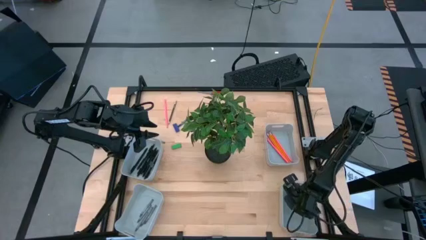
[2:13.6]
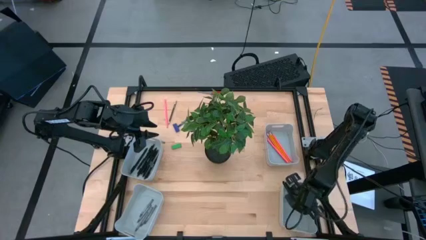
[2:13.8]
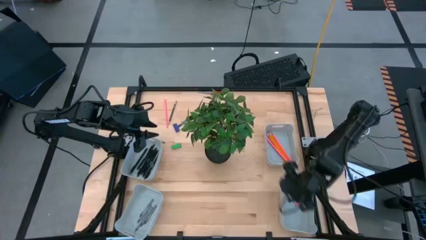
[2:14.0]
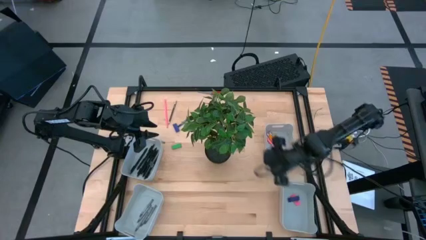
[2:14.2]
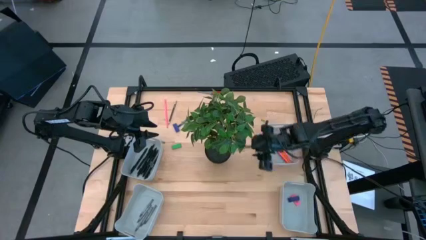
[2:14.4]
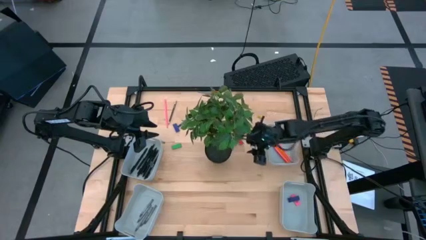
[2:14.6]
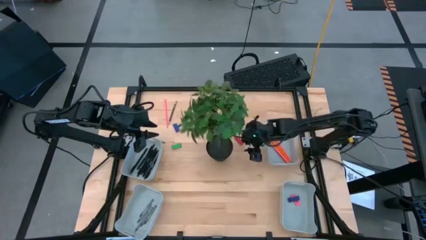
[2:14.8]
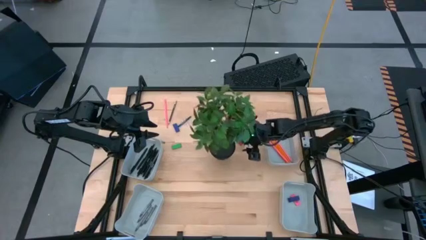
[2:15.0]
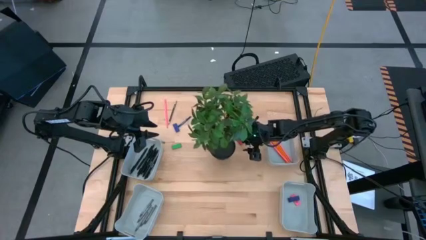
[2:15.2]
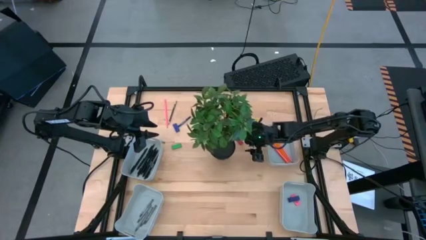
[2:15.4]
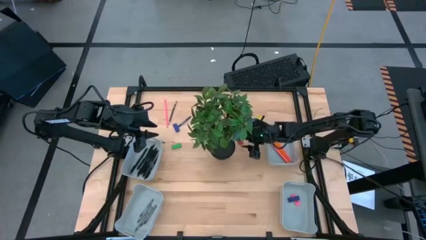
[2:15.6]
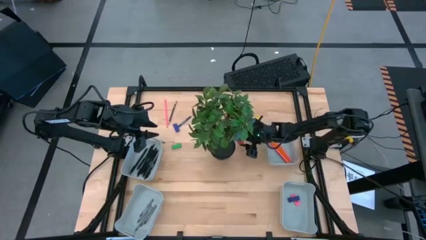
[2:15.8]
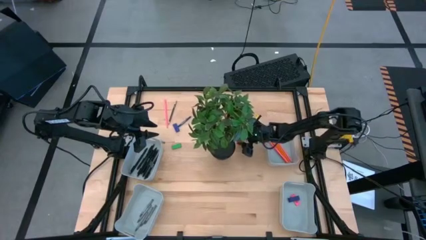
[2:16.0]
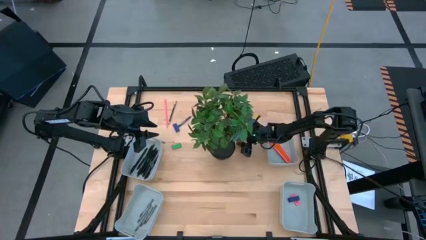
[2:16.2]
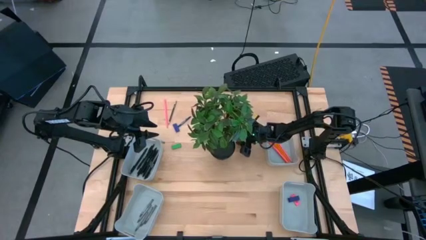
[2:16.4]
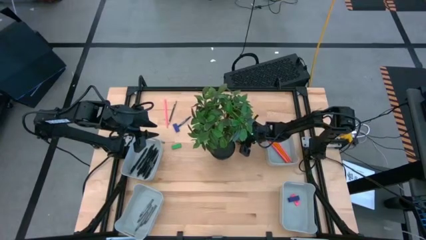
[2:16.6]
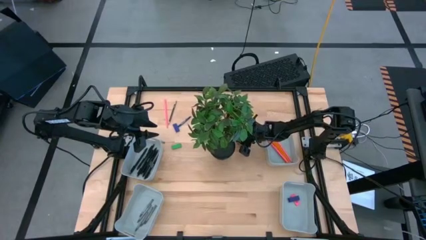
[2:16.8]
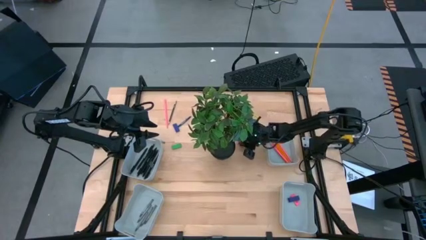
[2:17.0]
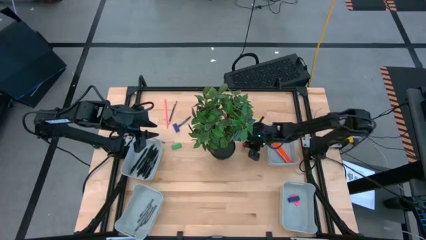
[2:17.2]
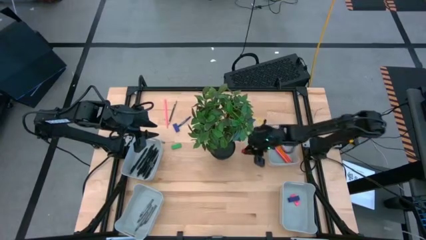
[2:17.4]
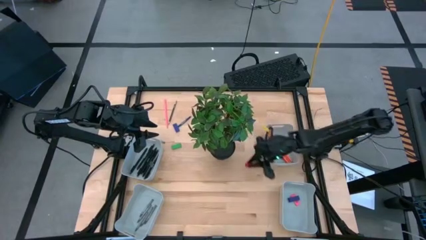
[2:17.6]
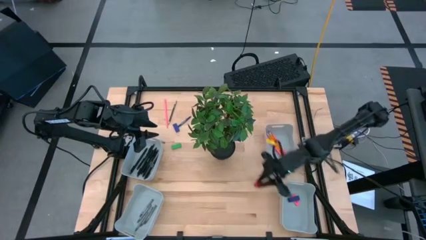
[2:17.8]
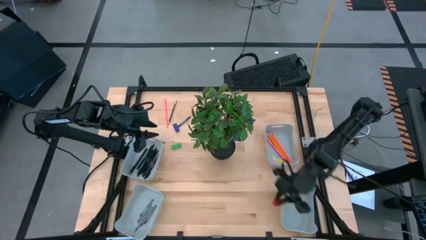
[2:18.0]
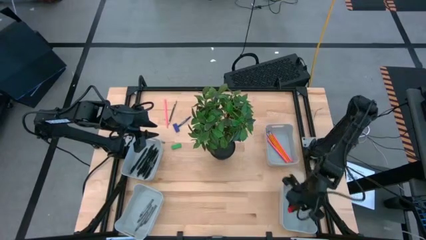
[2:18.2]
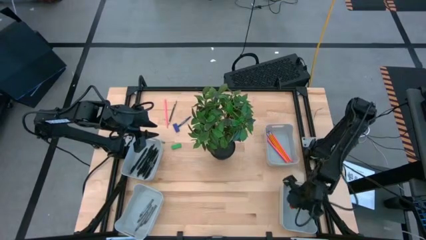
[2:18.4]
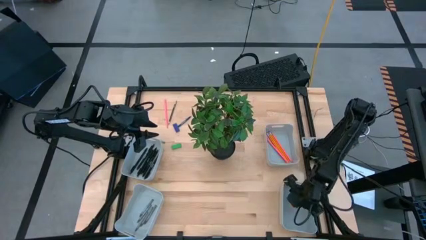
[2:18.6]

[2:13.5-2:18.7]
Task: Sort crayons/erasers/pens/pencils in bins
Put the red eraser into the bottom right gray bin

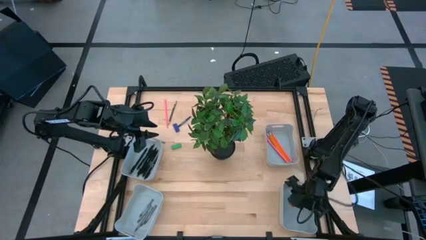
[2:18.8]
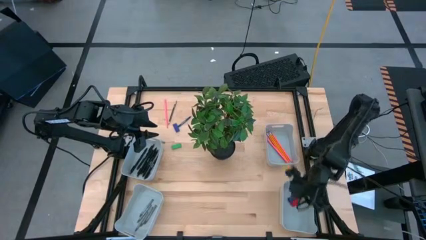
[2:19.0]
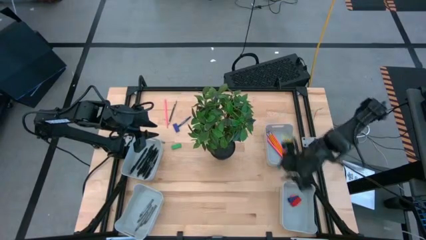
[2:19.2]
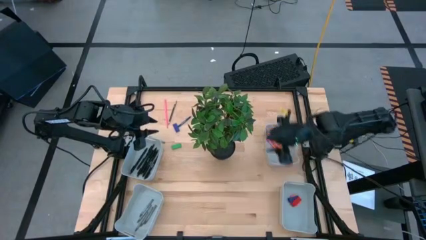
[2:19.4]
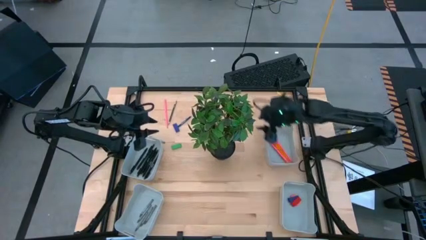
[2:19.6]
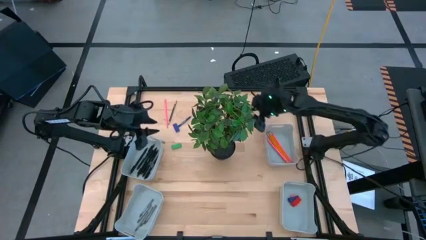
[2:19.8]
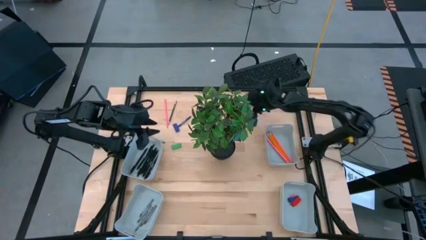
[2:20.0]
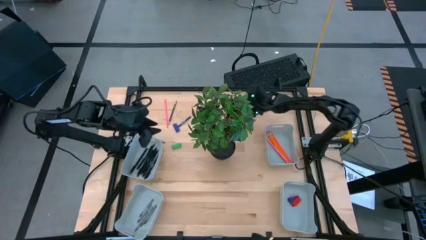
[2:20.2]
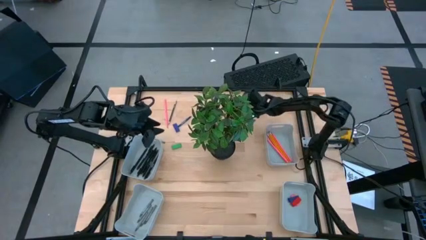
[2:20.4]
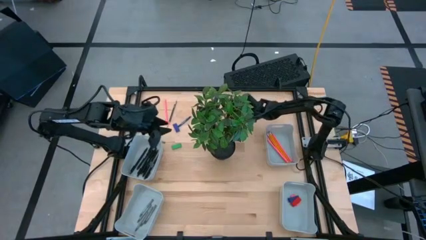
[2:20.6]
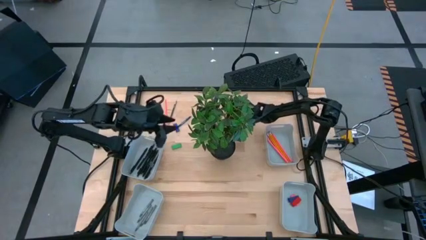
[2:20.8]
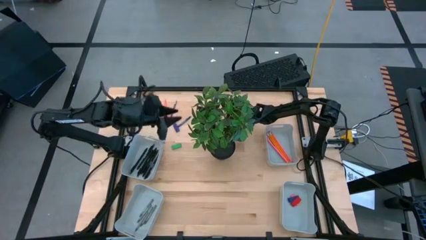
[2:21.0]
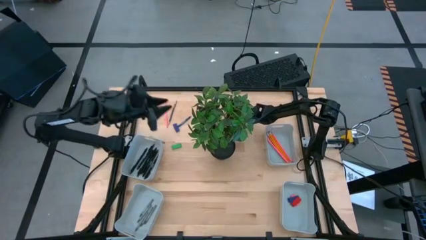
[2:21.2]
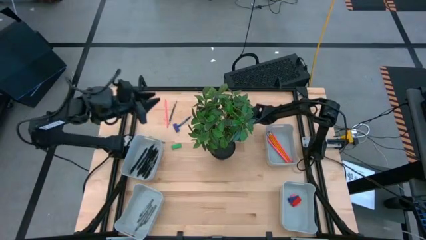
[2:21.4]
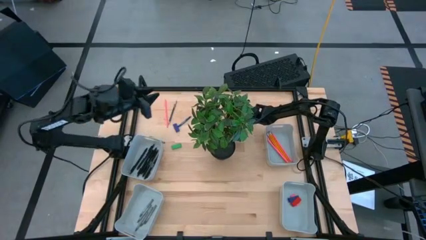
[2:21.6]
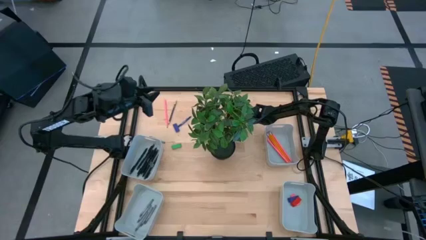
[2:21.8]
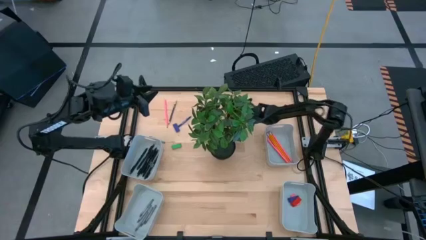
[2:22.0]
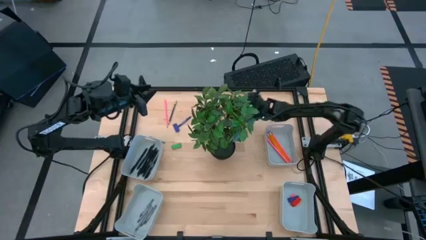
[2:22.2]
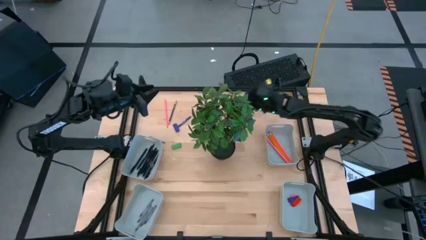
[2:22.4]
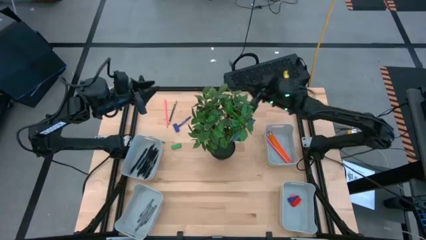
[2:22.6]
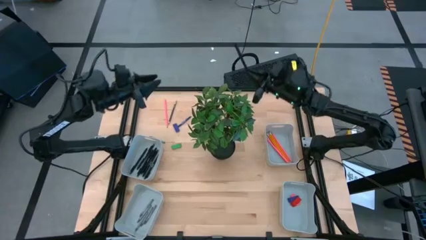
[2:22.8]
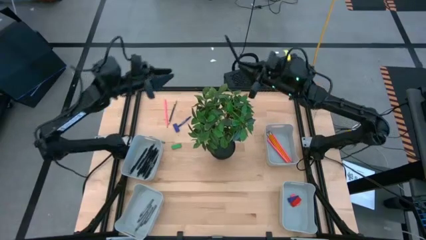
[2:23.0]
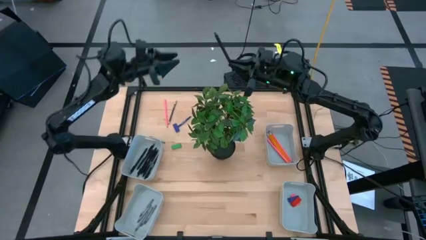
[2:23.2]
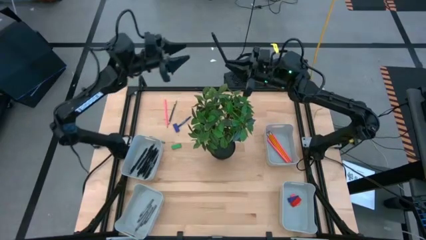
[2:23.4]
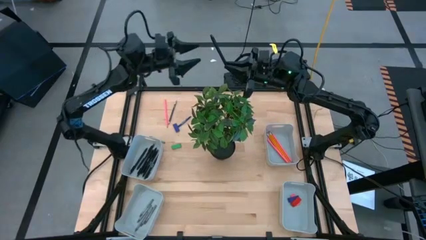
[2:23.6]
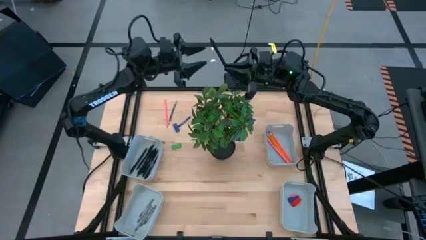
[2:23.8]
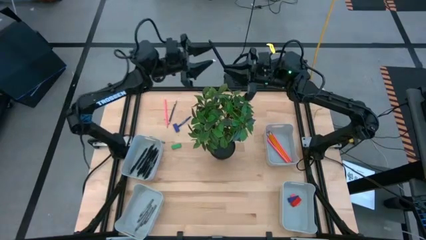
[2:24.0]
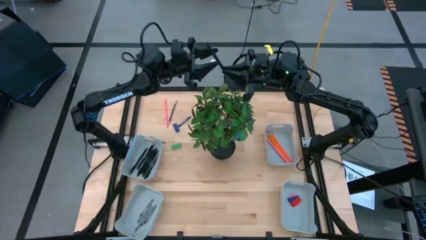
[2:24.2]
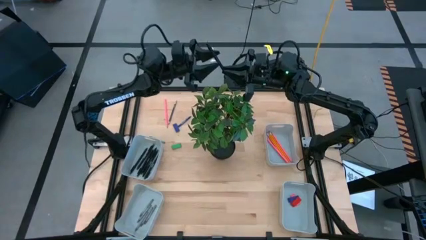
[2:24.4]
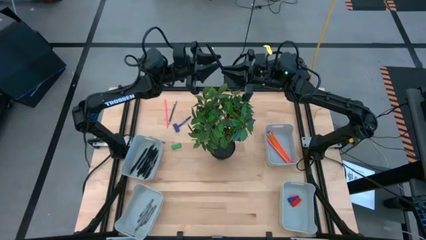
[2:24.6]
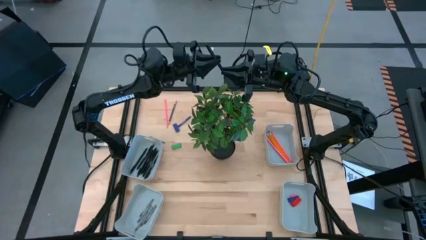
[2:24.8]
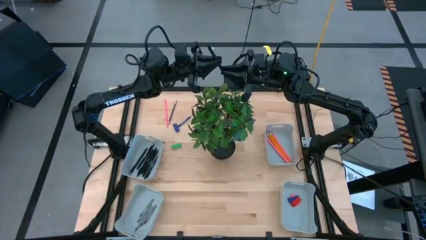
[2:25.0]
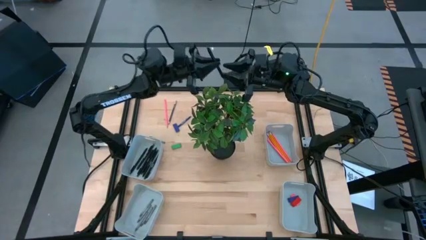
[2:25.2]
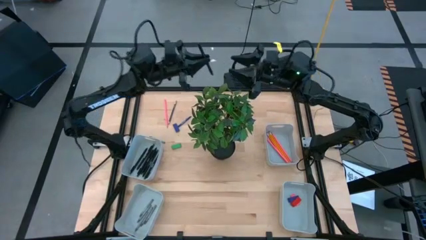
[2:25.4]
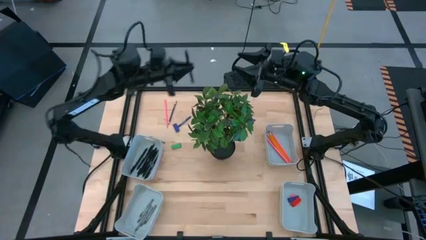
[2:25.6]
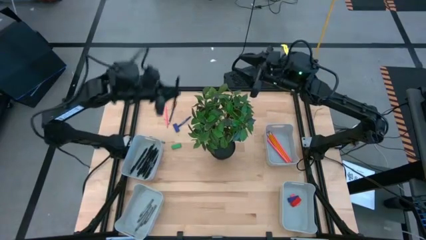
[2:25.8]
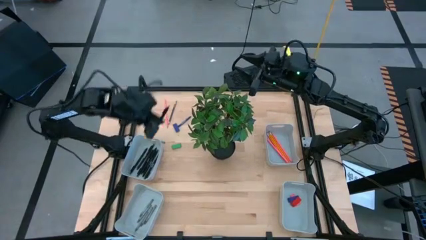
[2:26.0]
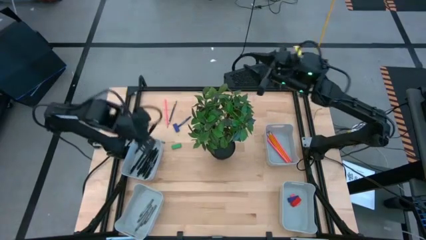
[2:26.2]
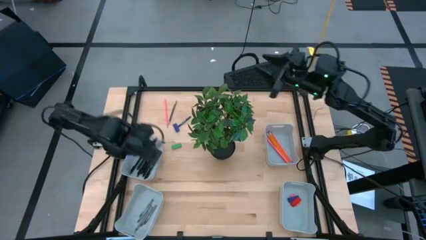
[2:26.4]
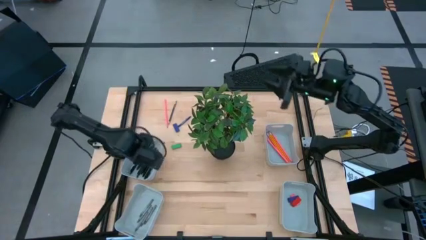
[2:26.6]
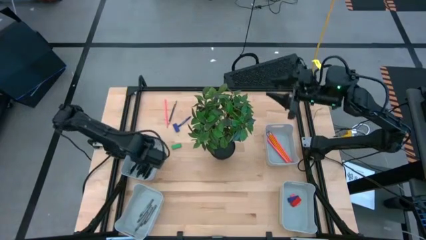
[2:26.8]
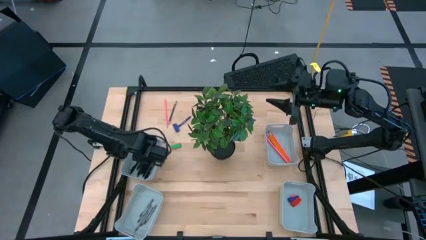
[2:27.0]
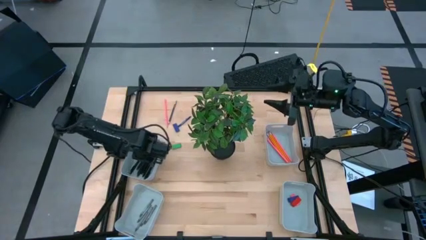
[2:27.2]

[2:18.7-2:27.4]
Put the black pen into the top left gray bin

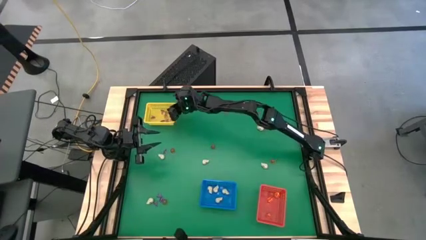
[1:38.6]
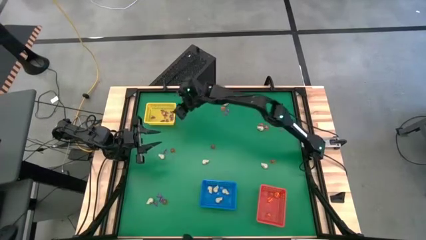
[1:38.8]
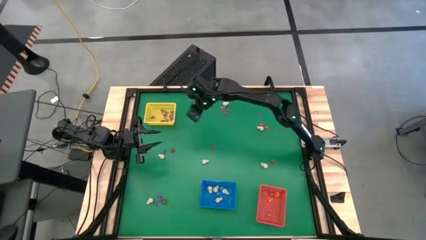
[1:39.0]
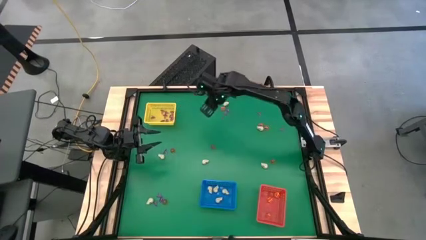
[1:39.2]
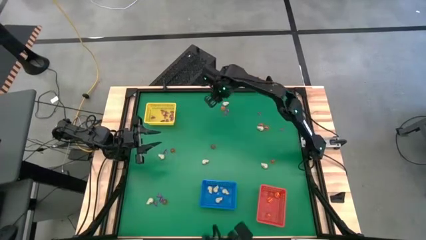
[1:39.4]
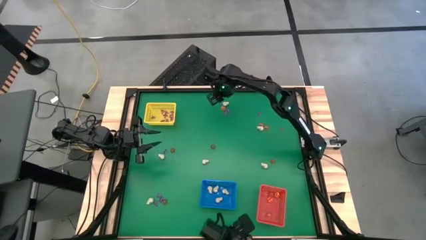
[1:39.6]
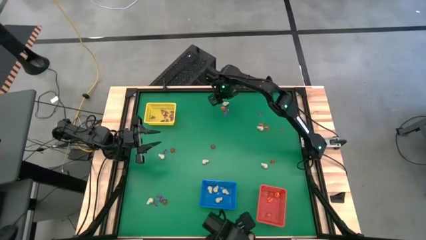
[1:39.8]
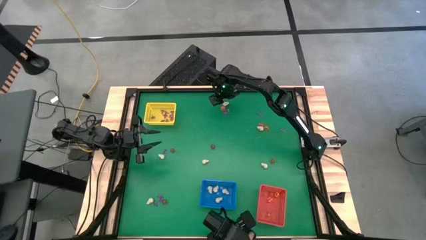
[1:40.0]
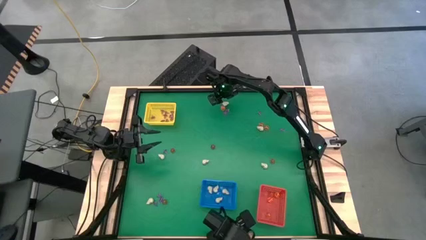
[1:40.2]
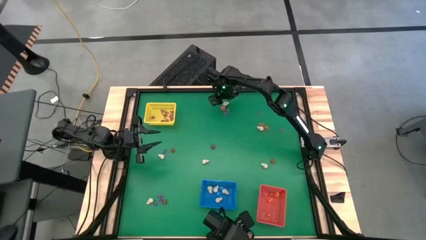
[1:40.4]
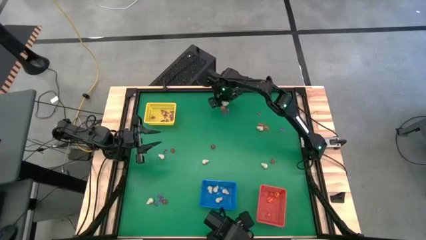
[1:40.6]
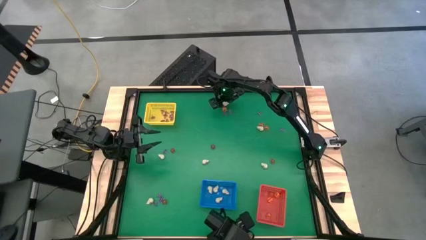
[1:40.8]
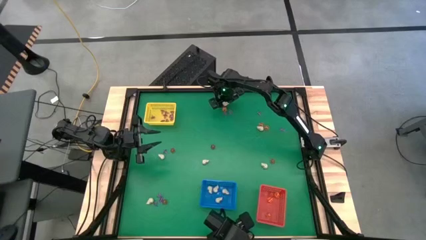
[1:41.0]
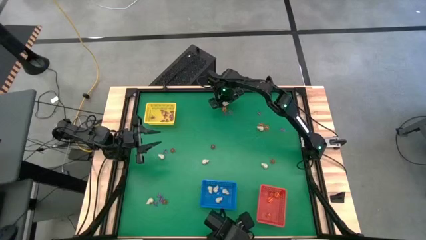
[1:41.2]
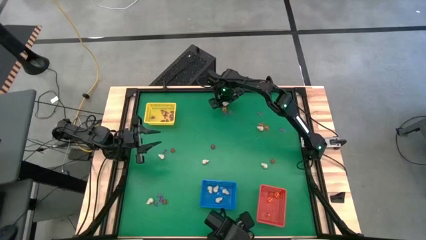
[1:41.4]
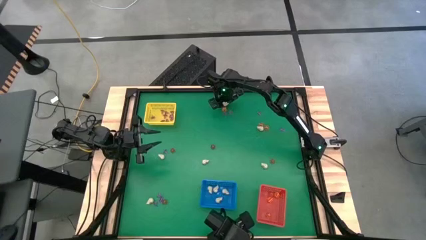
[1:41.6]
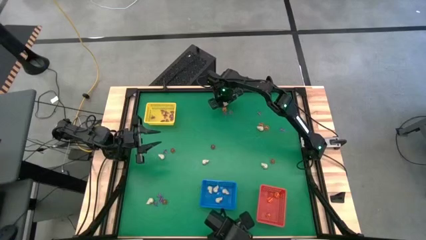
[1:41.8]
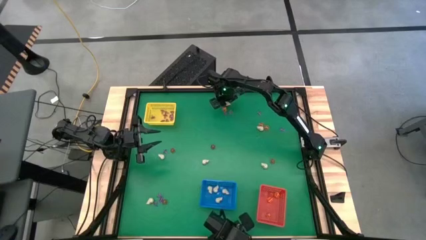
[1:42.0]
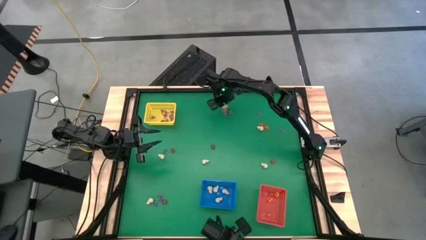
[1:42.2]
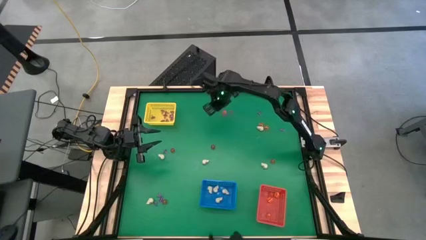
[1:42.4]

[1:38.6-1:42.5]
Task: Sort Halloween decoration
Put the white skull toy into the blue basket
